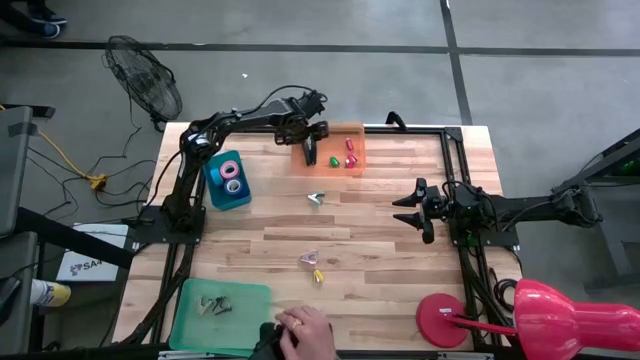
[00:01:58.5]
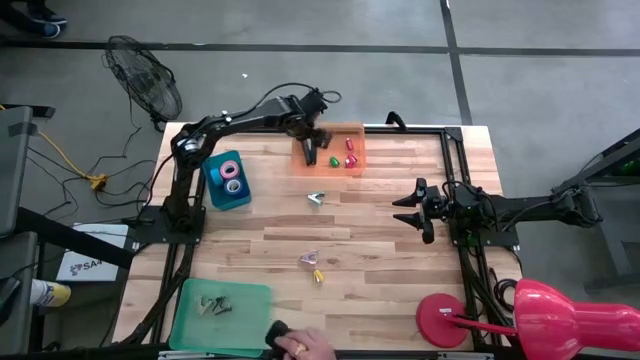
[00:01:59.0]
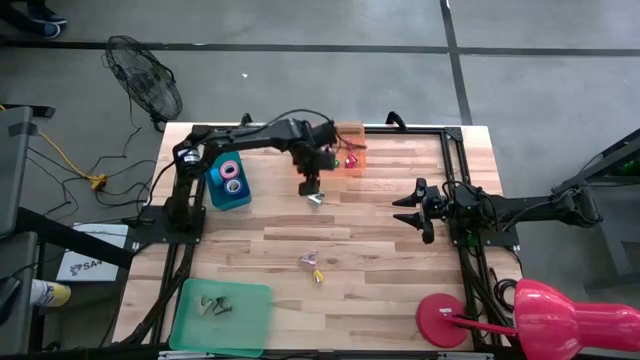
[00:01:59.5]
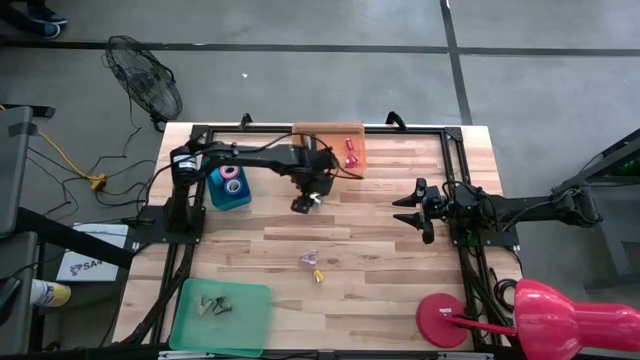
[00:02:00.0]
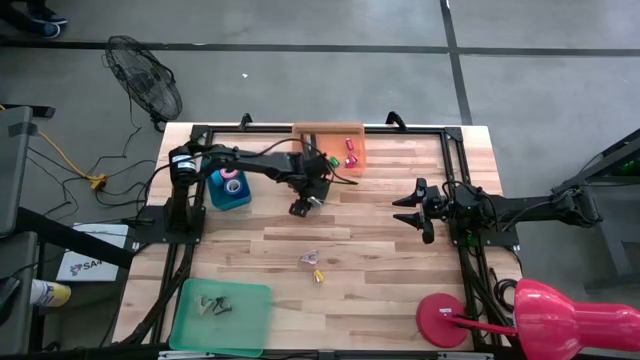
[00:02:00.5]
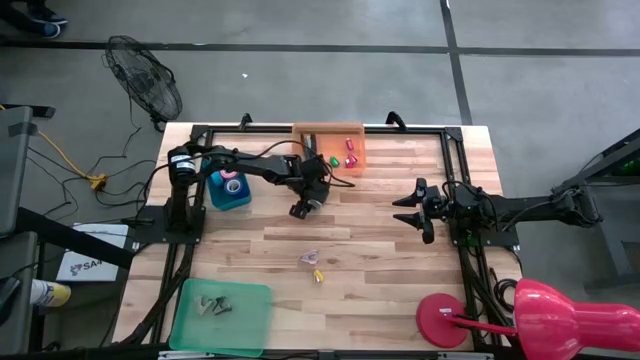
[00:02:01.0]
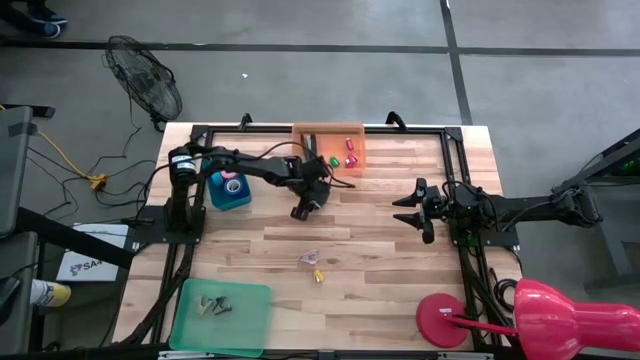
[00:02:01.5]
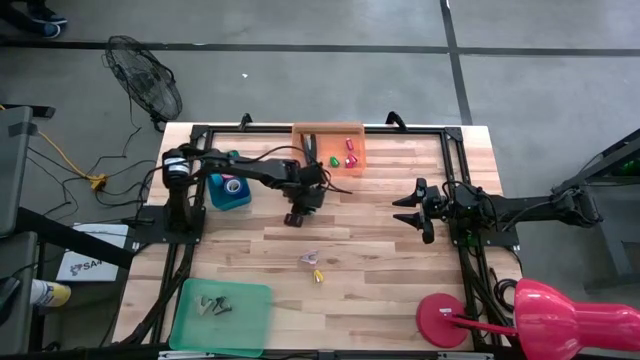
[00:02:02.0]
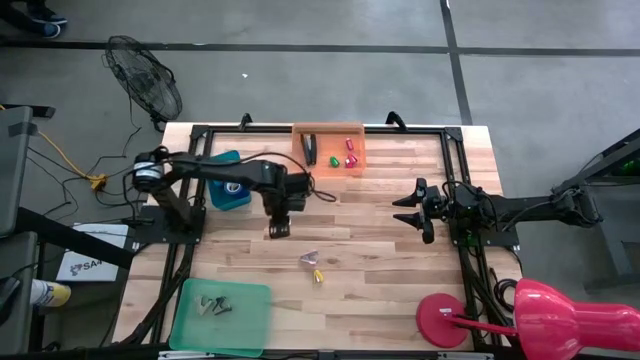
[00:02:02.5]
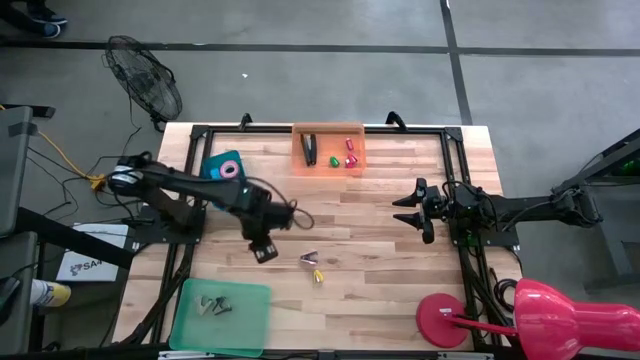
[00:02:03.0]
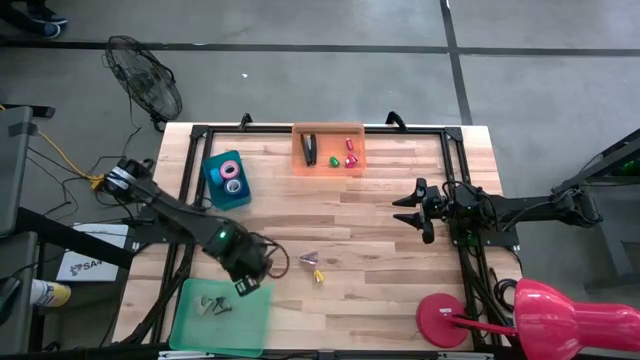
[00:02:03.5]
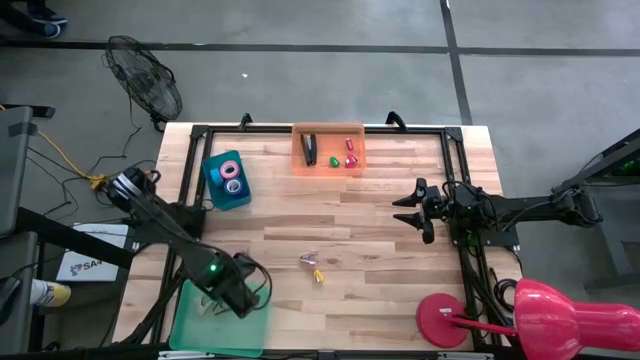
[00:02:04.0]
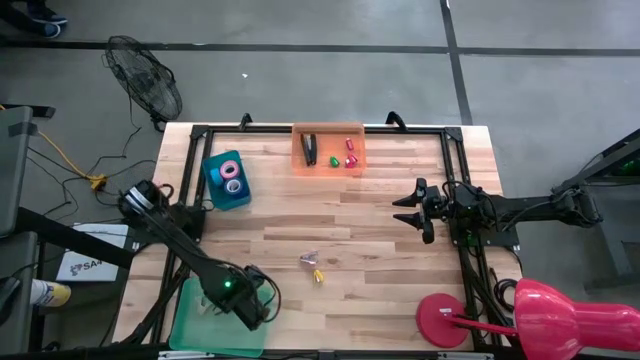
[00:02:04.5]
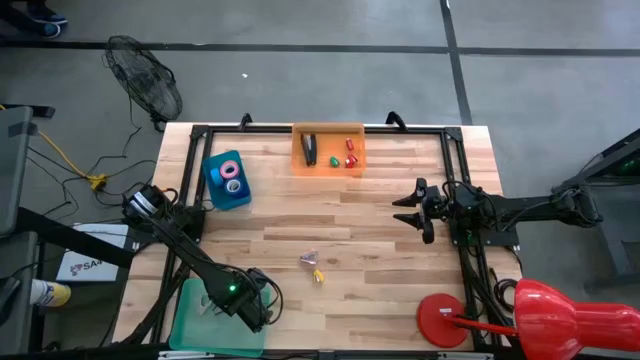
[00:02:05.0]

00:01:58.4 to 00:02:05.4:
Task: Pick and place Stapler, Stapler remover, tape
Put the green staple remover into the green bin

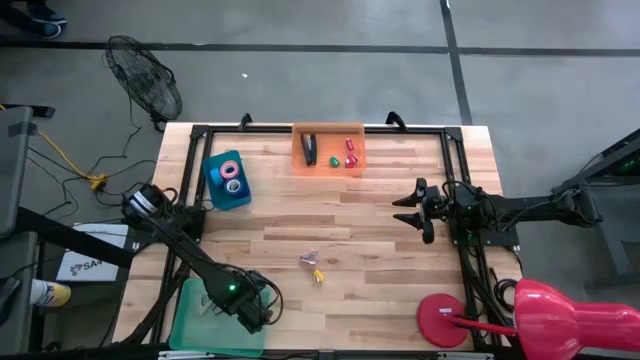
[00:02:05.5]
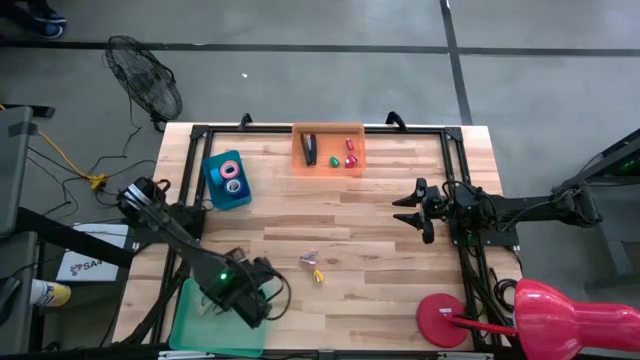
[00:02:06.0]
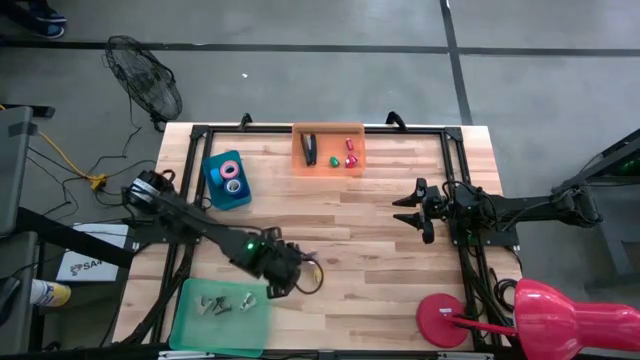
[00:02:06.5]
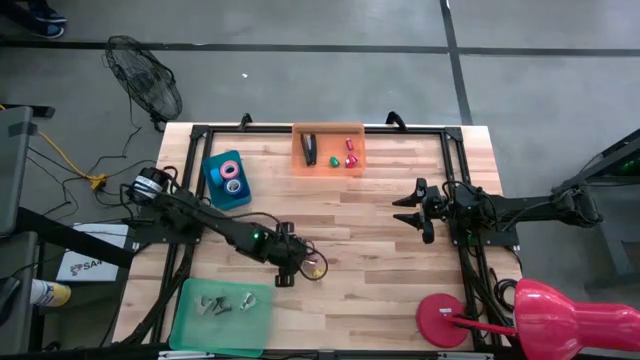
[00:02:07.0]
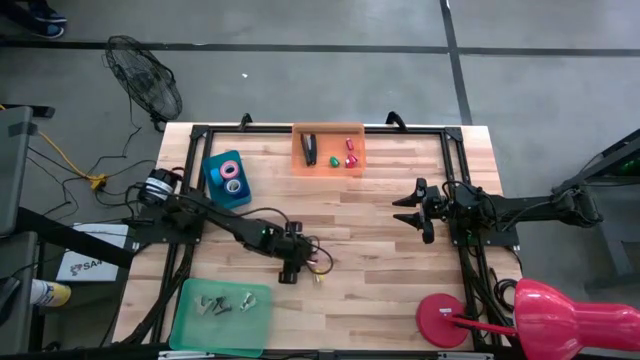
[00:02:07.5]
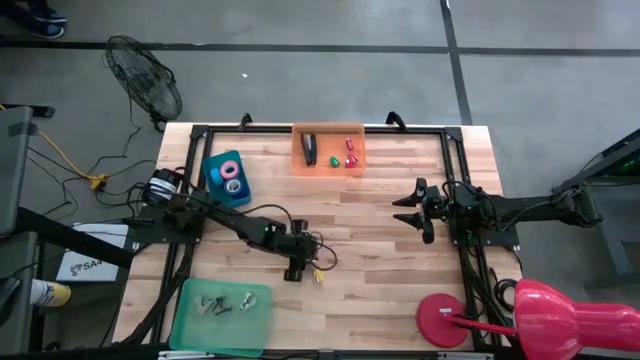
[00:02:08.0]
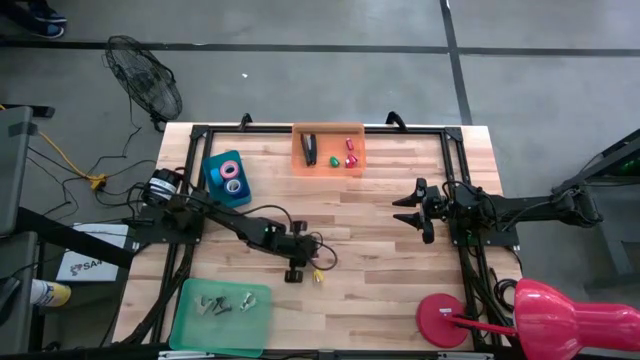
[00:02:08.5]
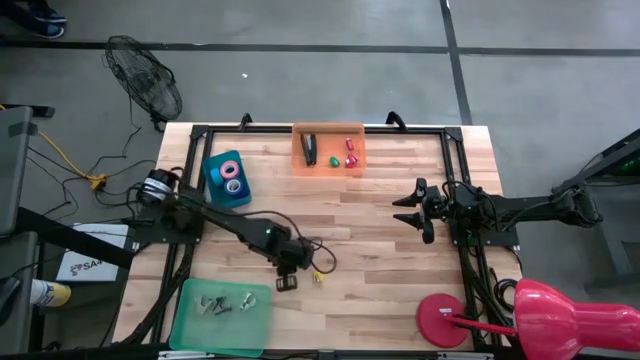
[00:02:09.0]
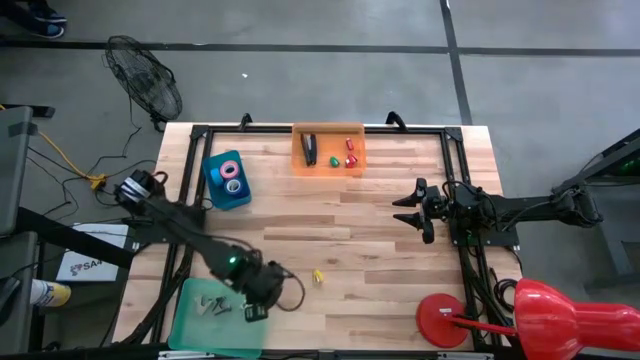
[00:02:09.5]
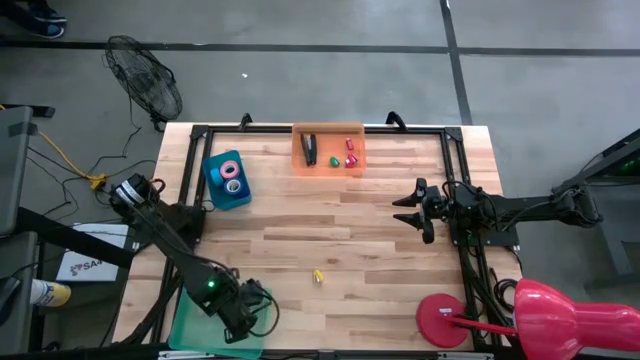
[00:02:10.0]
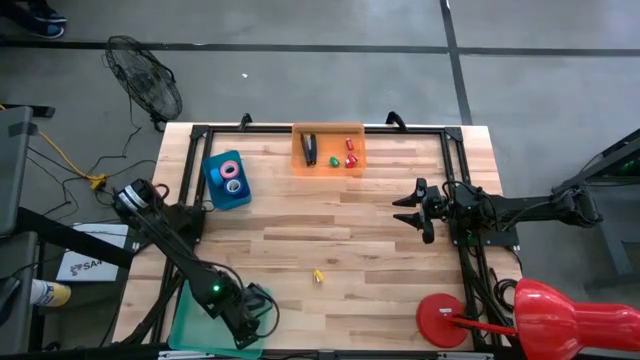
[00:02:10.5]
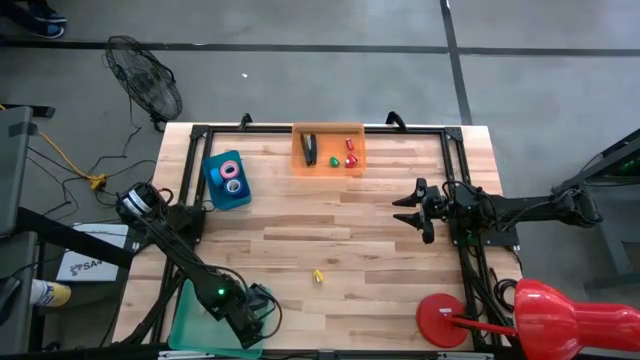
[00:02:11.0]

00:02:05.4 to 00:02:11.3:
Put the pink staple remover into the green bin

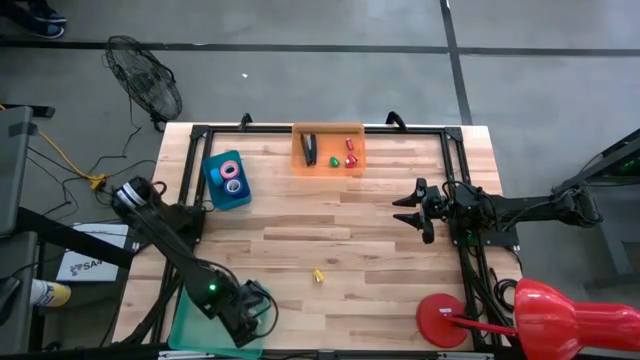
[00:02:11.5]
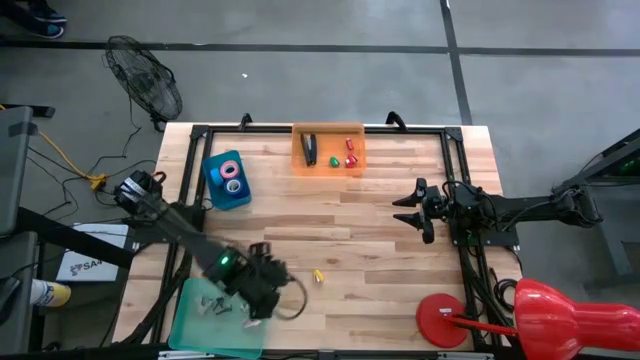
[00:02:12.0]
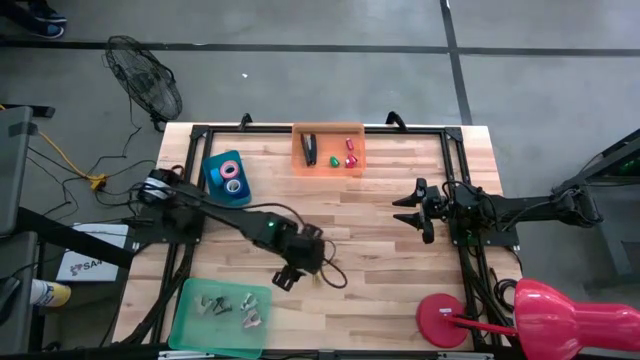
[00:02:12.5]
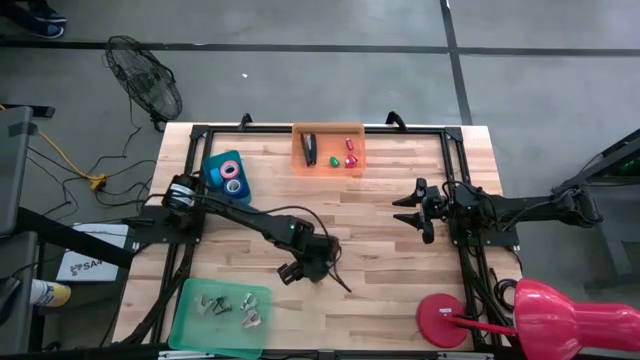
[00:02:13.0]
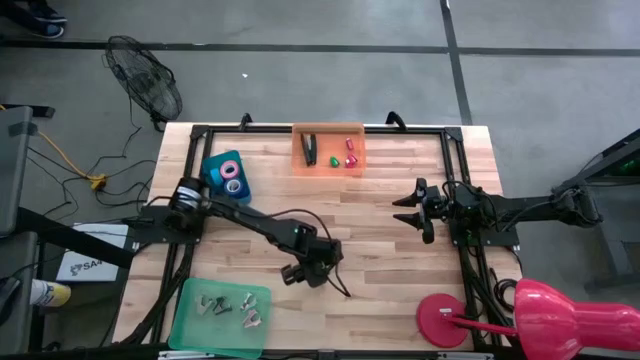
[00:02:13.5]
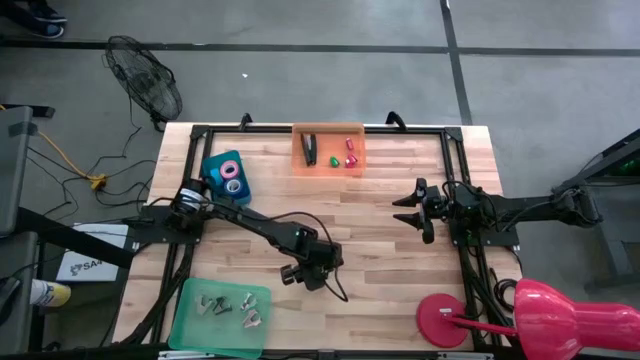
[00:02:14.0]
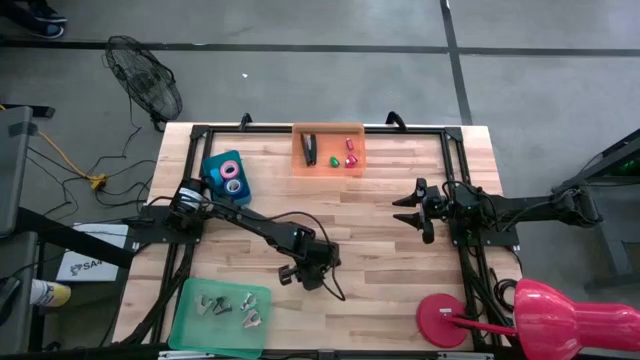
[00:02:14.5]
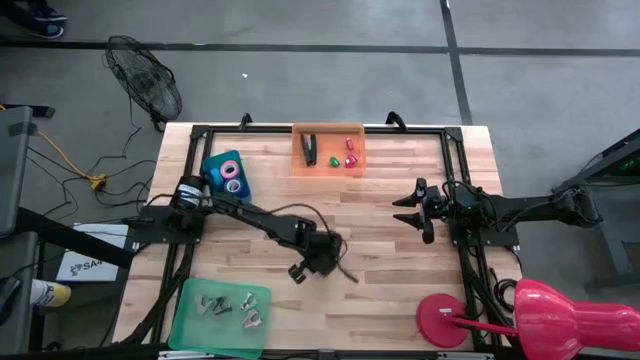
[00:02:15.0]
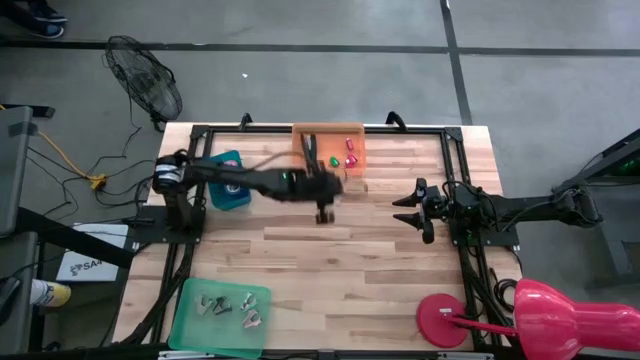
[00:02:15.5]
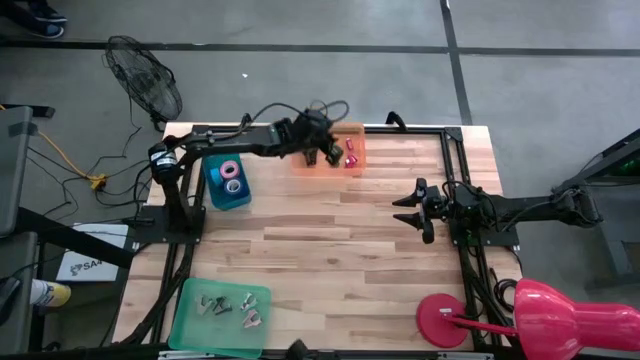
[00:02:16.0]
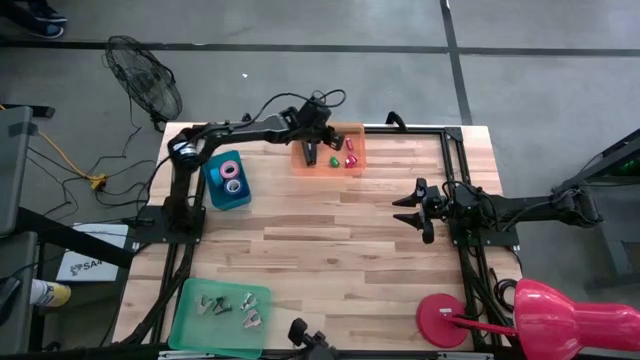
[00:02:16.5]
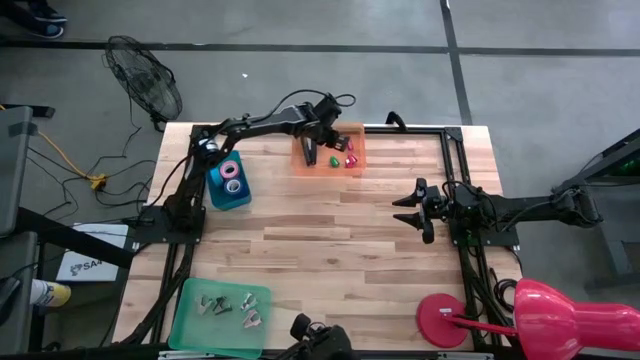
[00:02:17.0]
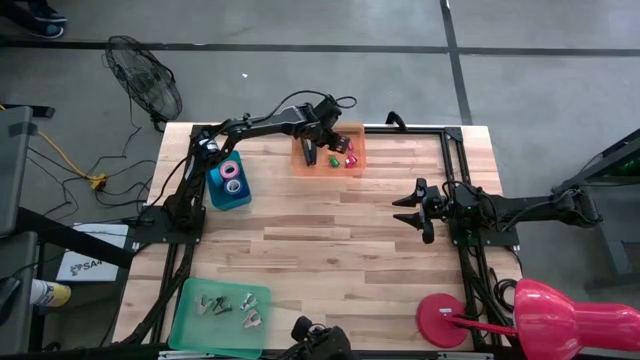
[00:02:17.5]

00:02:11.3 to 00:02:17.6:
Put the yellow stapler into the orange bin

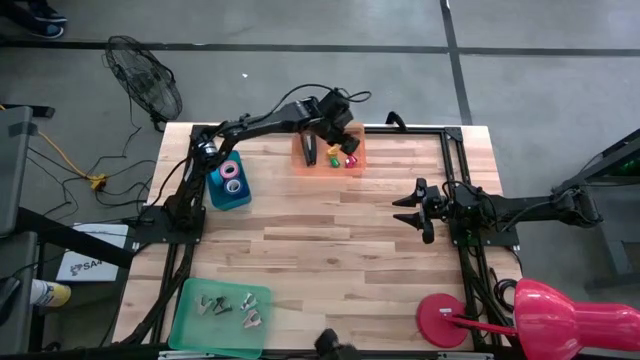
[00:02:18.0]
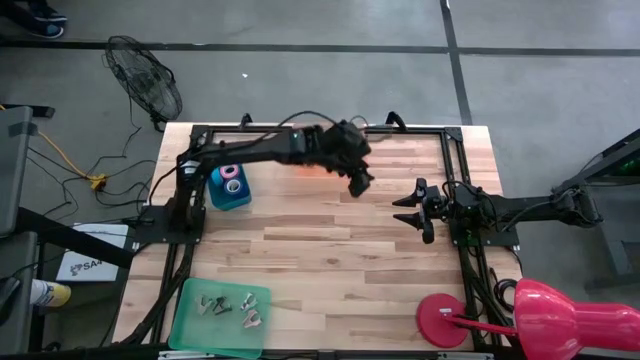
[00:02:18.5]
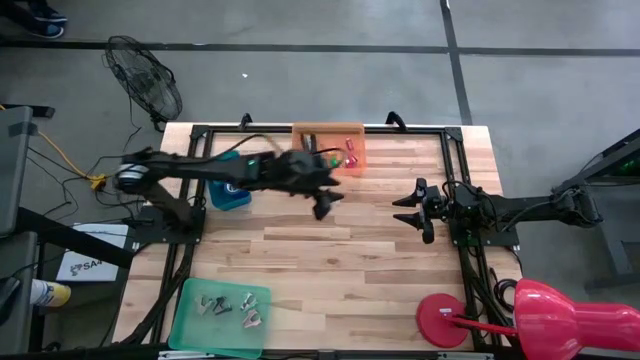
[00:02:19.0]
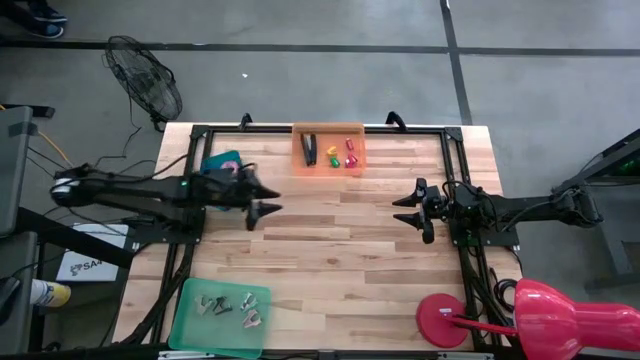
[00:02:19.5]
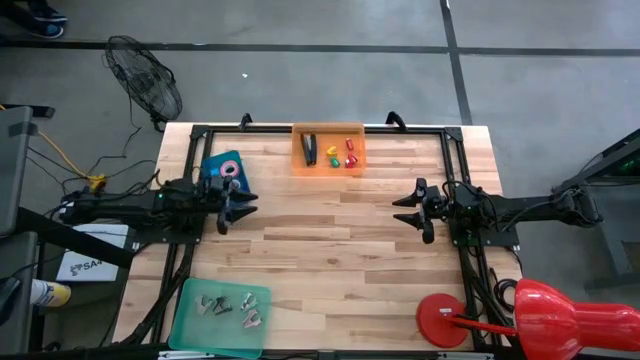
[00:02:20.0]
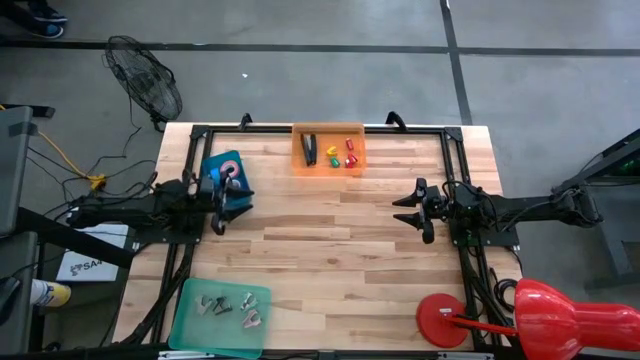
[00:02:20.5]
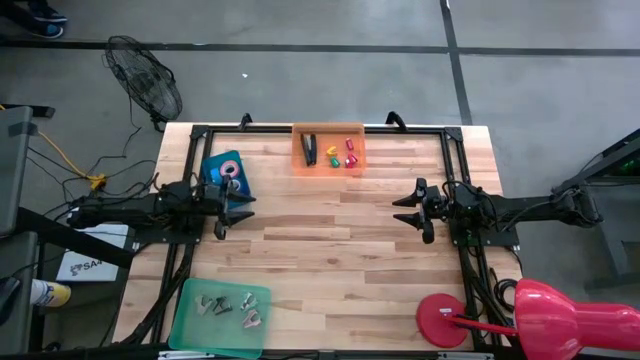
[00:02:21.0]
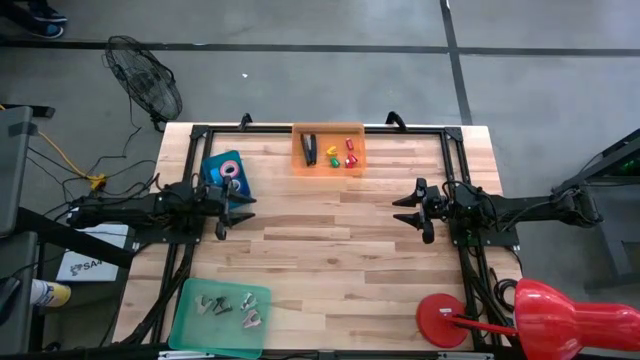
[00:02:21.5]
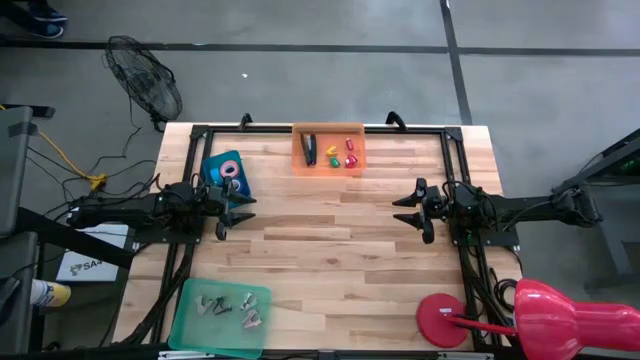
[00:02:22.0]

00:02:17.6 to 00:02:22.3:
Return to Home Position
